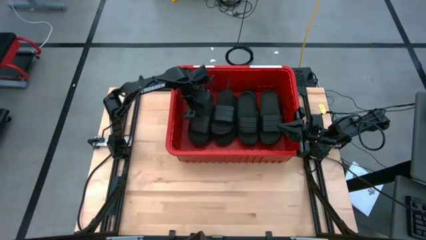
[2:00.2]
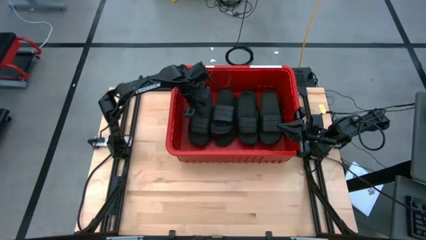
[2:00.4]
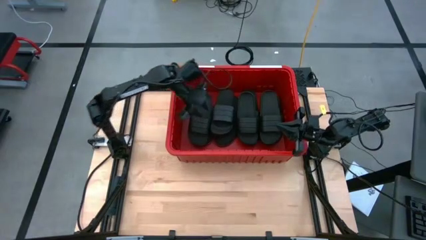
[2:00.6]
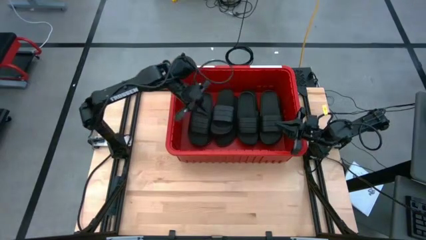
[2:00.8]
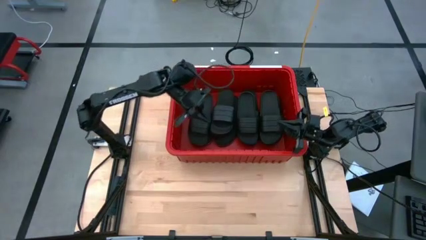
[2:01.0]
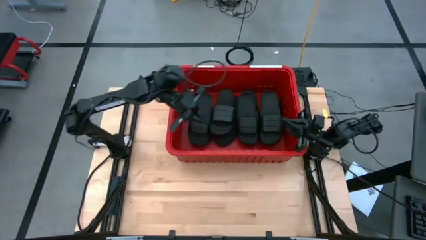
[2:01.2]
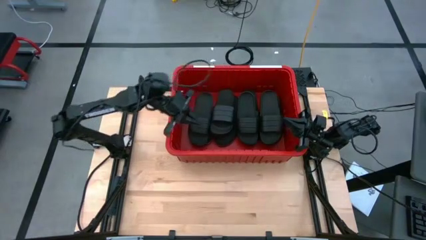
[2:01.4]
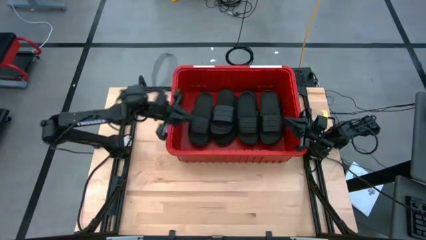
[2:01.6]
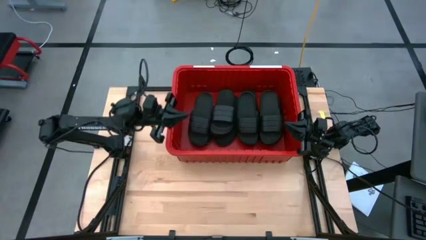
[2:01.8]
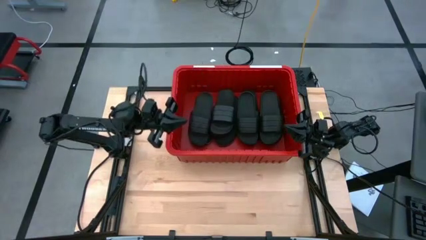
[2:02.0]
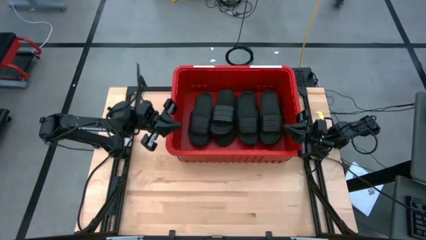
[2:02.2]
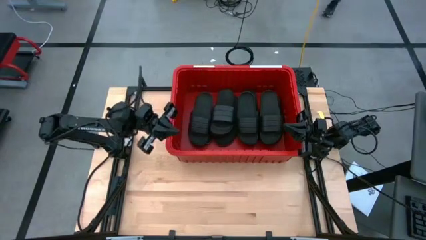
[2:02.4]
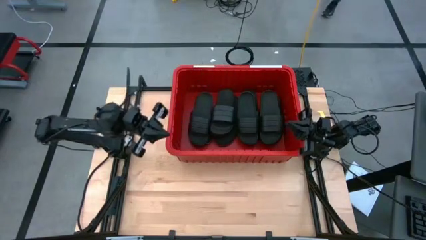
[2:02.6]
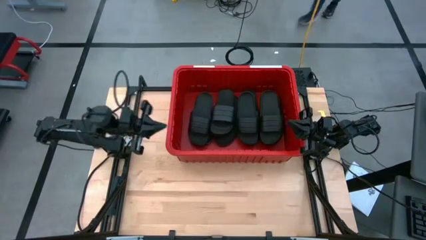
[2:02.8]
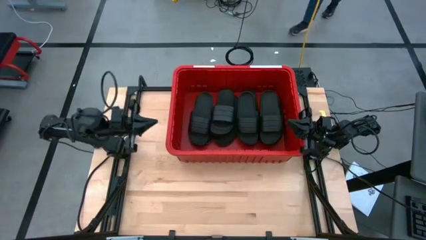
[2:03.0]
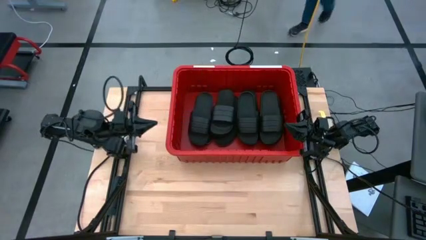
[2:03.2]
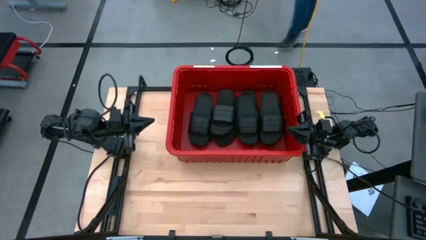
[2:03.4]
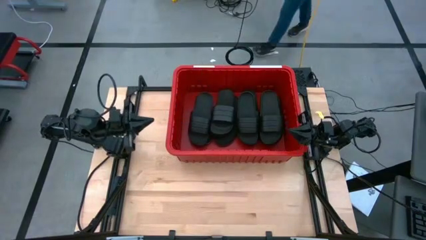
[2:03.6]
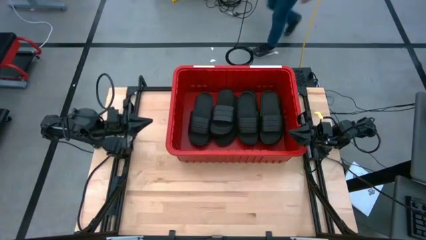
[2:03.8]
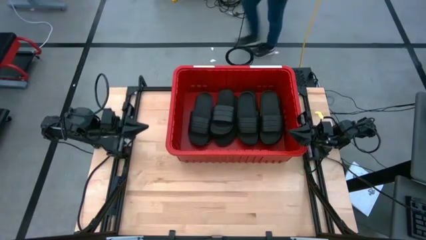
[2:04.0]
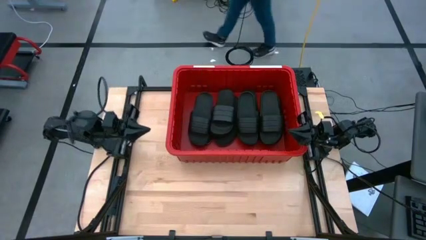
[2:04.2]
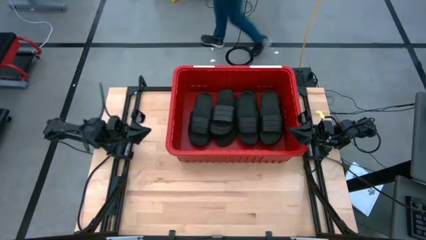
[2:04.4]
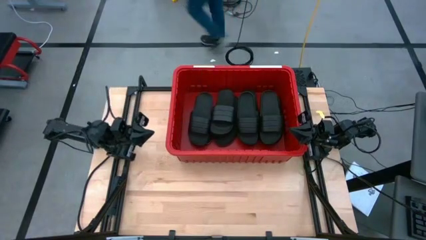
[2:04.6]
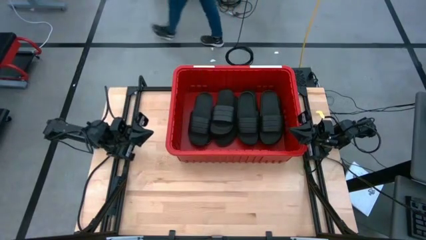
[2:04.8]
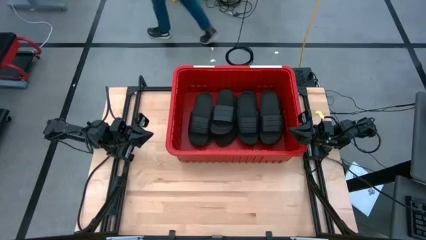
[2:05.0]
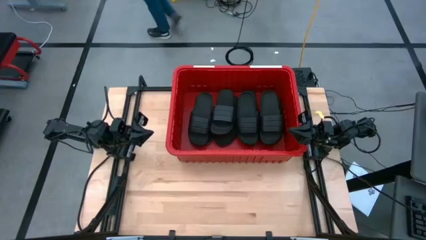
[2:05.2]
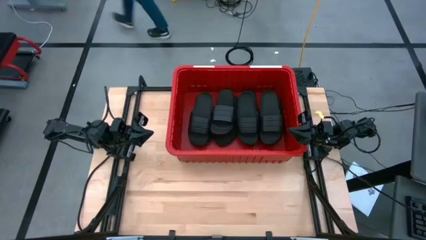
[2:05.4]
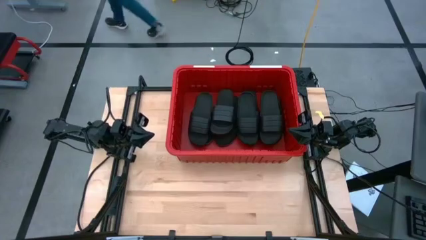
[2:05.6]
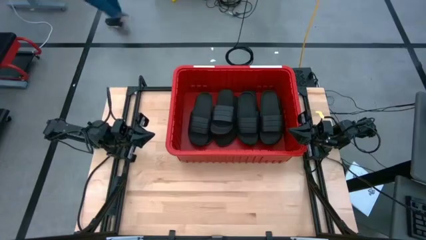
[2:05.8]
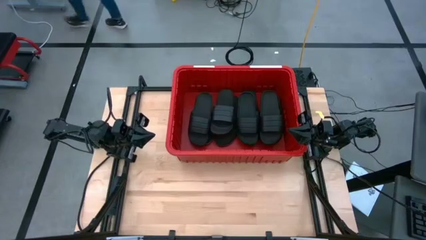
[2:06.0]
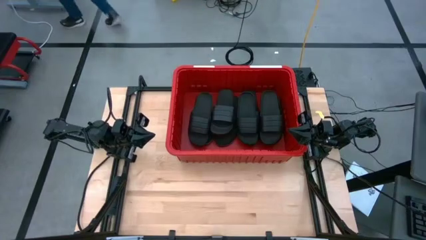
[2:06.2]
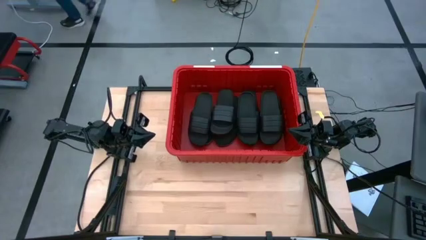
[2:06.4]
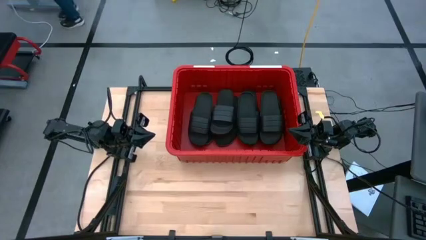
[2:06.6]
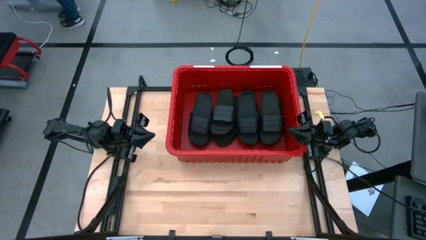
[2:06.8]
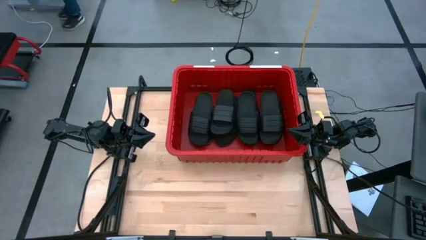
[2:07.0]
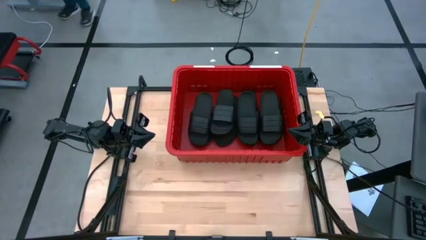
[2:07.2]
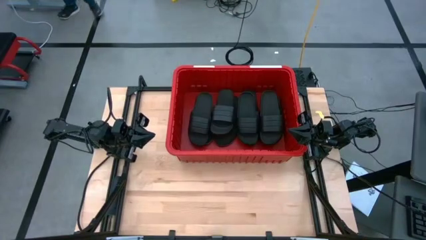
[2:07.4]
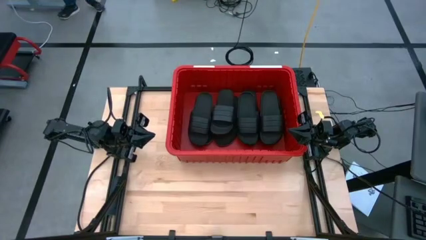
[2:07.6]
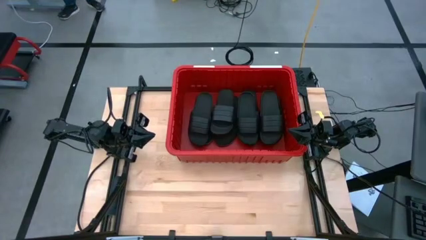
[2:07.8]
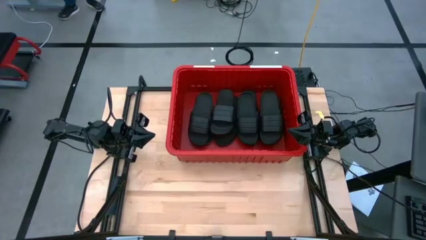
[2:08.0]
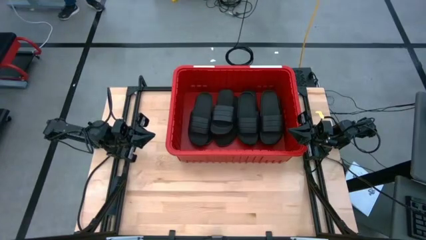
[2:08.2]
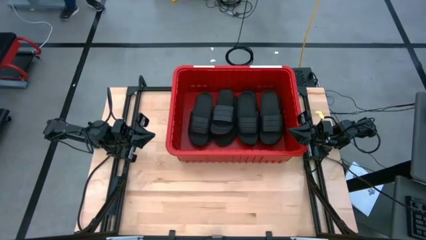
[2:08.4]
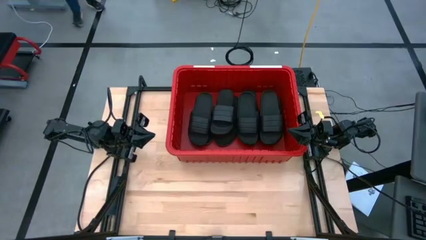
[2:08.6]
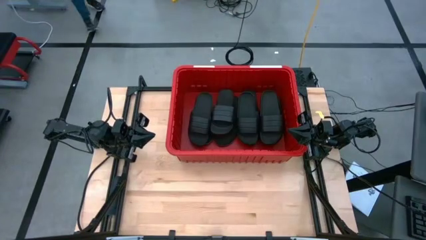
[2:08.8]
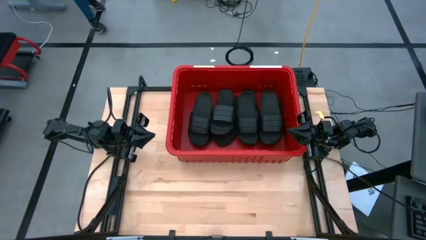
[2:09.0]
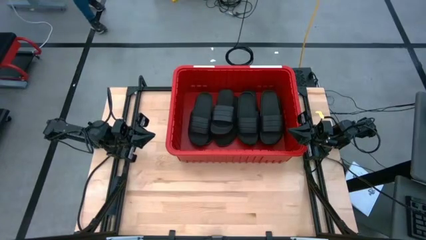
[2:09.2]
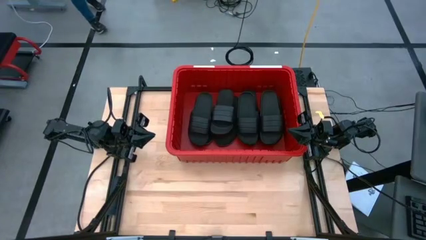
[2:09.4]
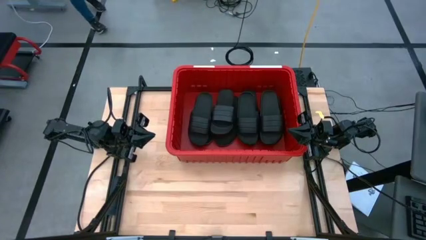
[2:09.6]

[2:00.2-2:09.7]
Task: Pick and place slides into bin
Return to Home Position
